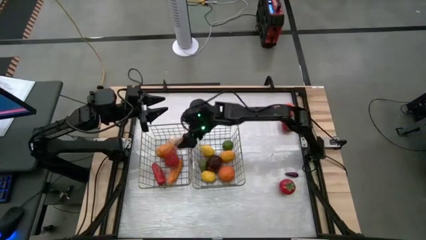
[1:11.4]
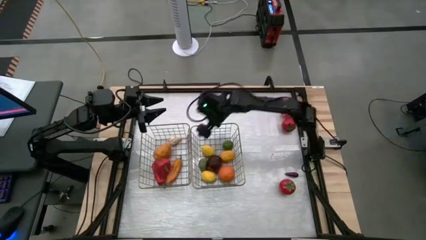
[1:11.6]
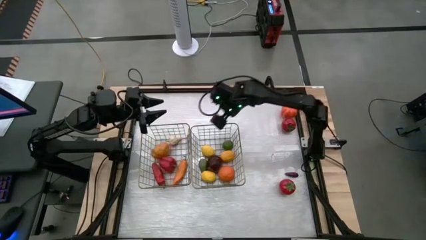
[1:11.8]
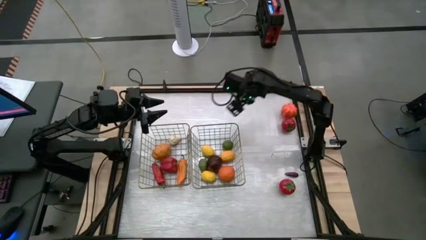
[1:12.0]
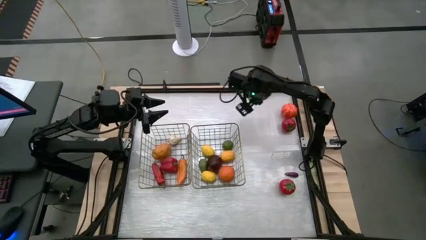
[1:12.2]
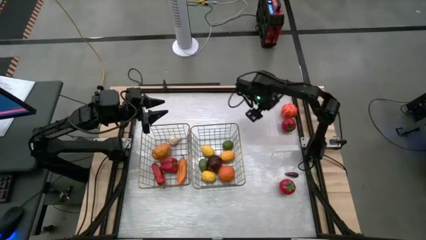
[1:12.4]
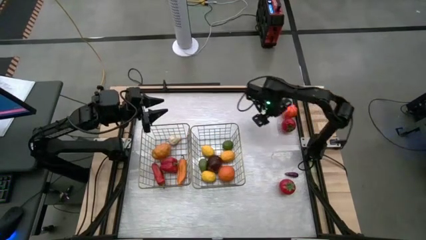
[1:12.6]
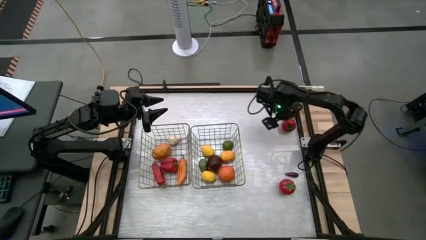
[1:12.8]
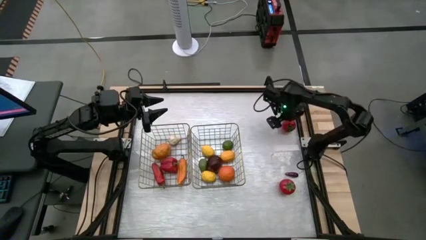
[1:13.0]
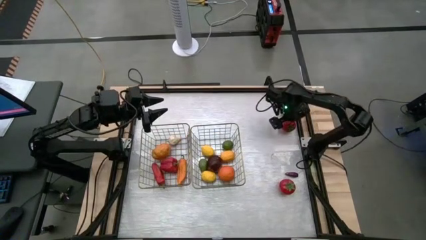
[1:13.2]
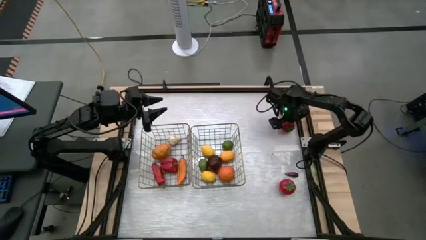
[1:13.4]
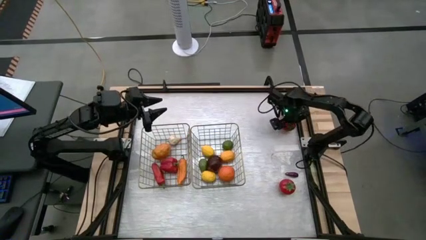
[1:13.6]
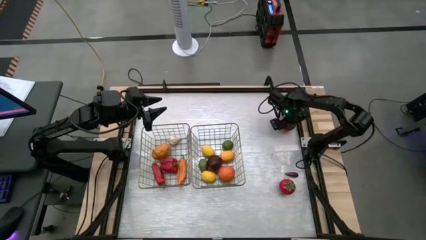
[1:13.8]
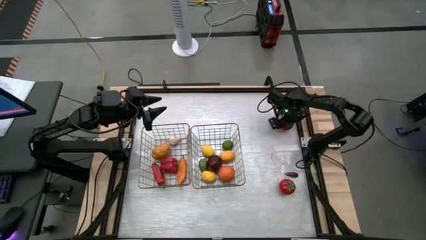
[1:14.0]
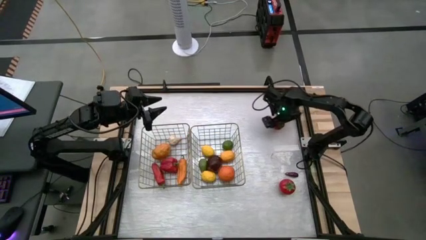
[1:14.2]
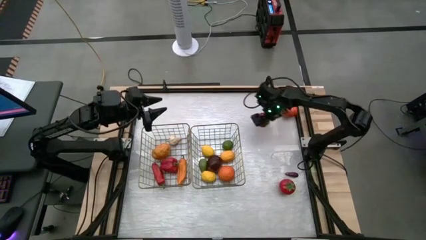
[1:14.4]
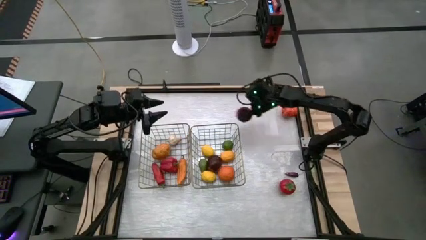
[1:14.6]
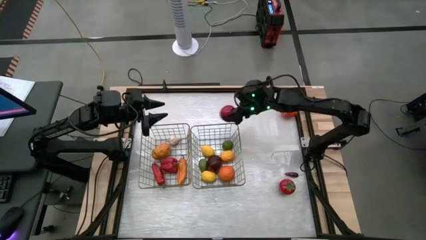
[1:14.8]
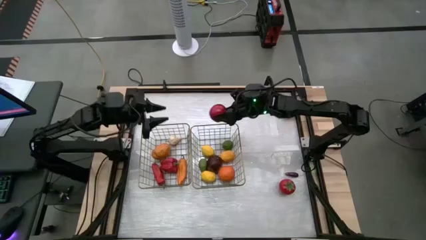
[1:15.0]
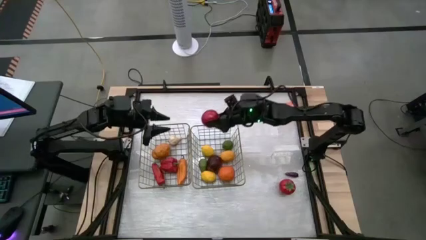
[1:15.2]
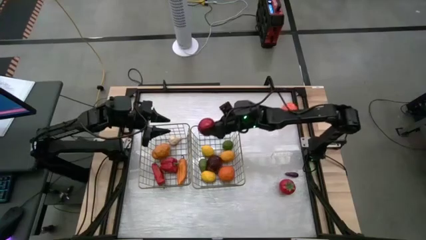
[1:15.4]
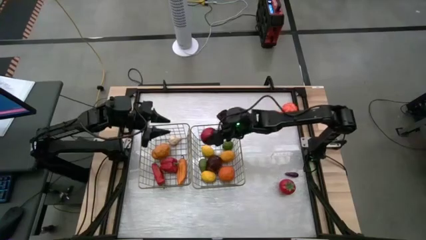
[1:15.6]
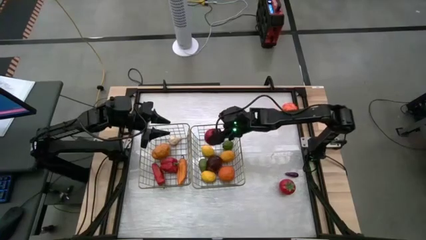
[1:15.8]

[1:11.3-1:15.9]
Task: Sort produce into baskets
Put the top red tomato into the right basket

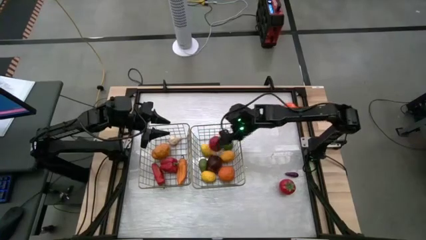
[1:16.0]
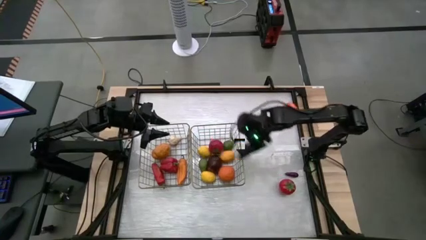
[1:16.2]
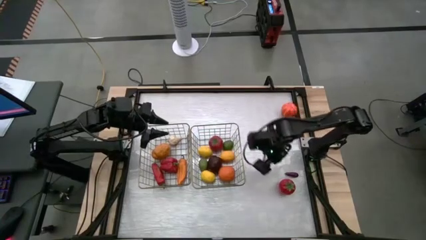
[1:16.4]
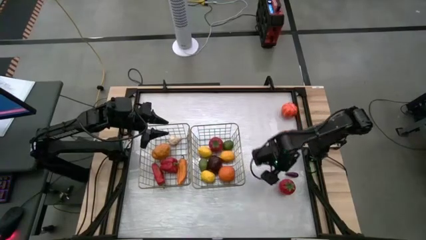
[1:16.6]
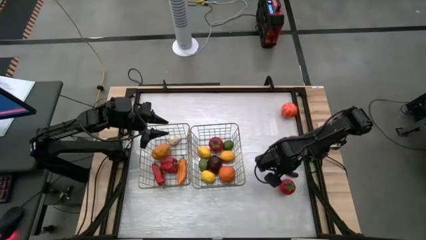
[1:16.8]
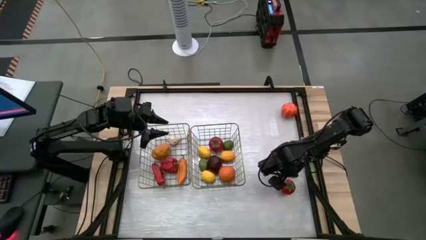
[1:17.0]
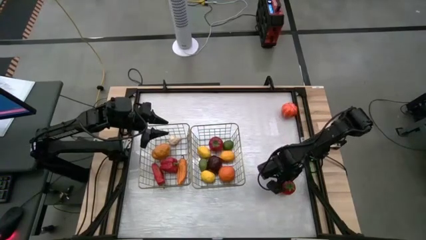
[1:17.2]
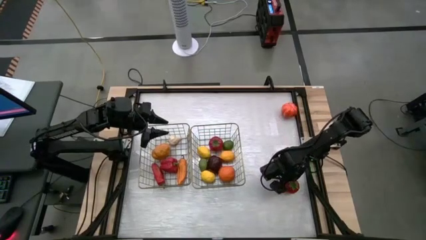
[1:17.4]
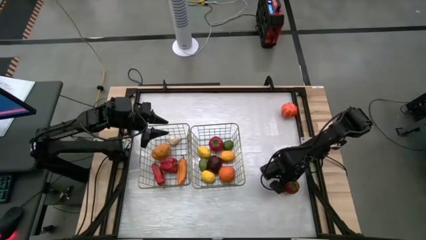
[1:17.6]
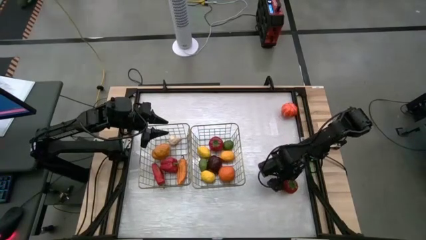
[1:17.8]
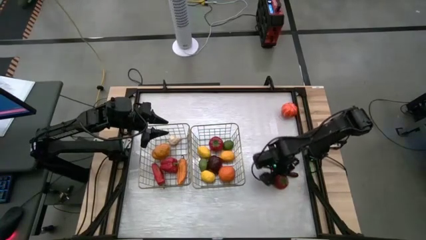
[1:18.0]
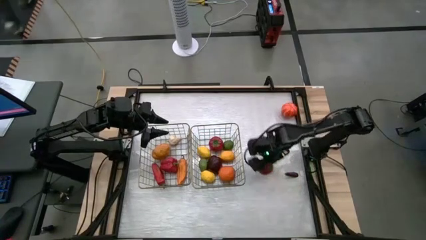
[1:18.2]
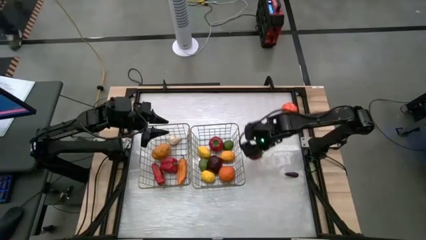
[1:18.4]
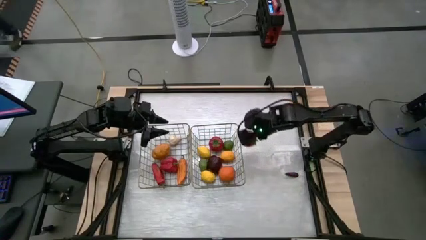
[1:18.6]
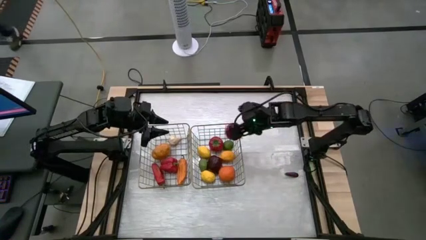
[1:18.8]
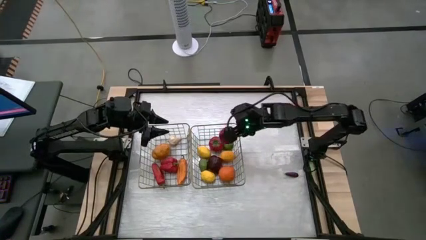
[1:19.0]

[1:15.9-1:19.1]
Put the red tomato into the right basket

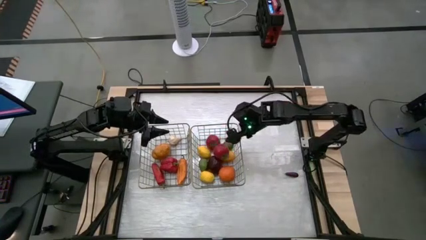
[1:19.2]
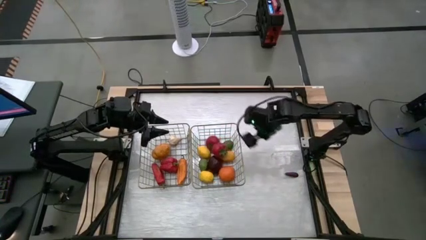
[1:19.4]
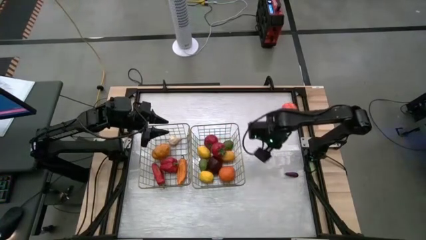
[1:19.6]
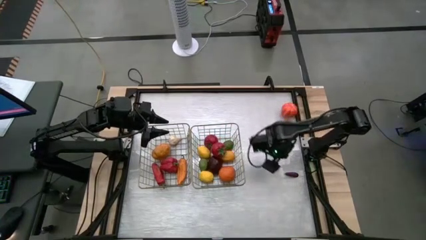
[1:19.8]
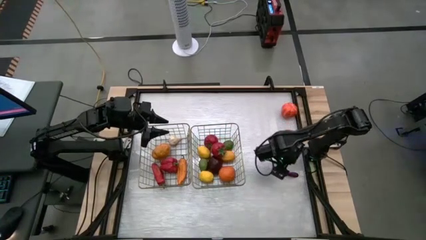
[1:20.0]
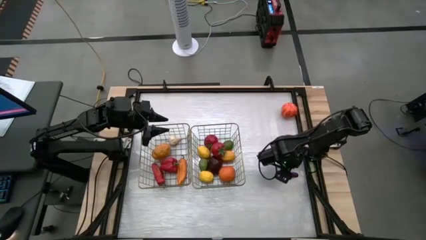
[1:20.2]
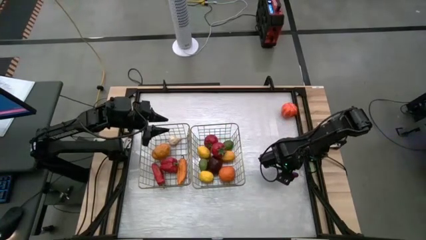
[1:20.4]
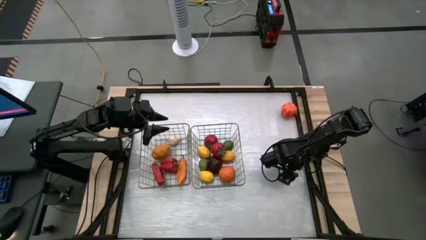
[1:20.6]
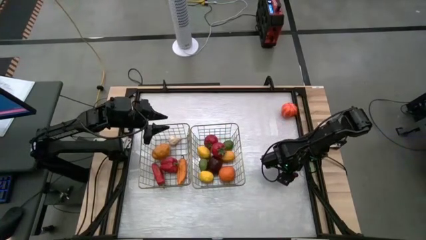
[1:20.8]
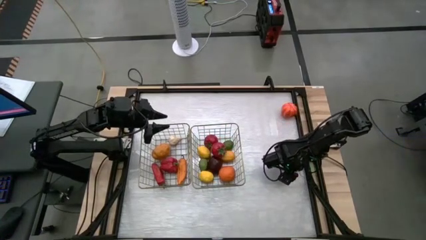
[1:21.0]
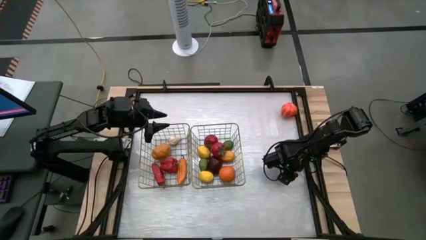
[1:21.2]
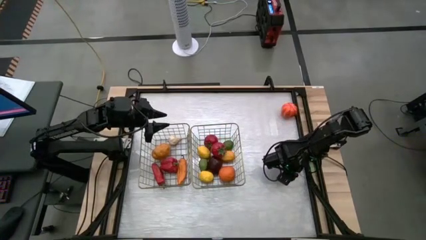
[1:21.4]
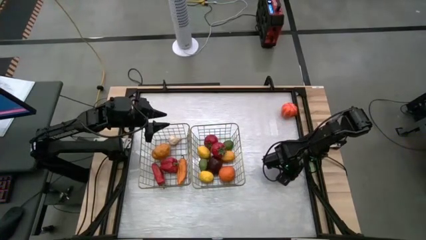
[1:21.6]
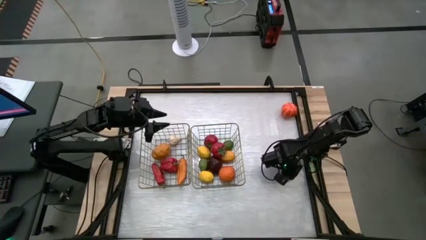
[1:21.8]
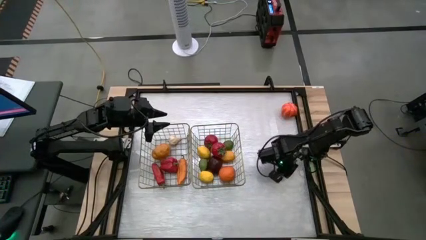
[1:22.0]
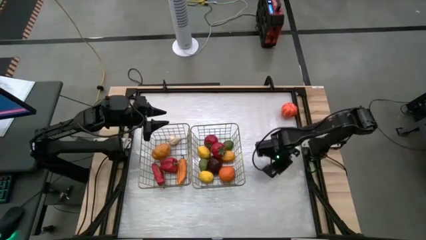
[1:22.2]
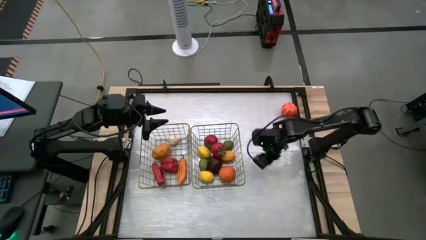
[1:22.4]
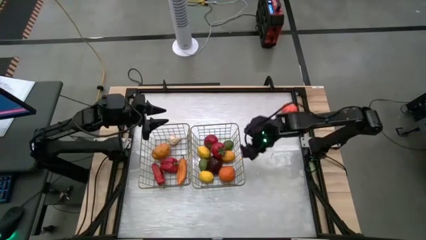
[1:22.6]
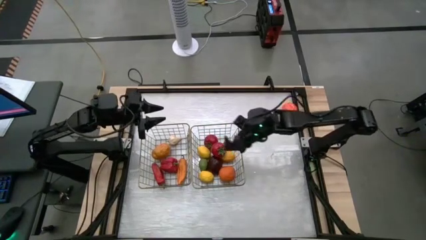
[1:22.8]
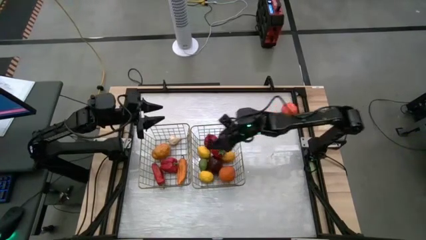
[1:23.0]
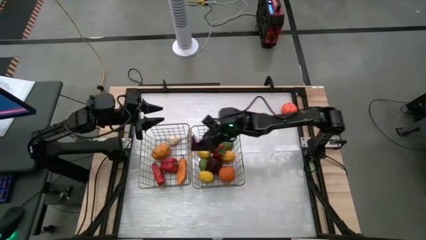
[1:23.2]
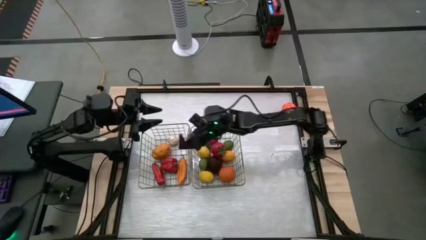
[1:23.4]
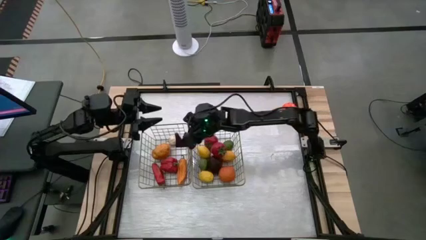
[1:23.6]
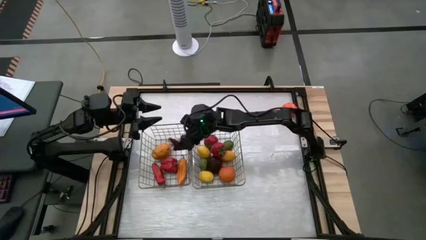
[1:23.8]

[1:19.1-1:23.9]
Put the eggplant into the left basket

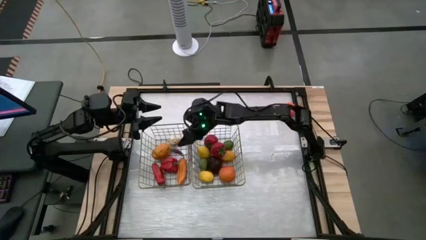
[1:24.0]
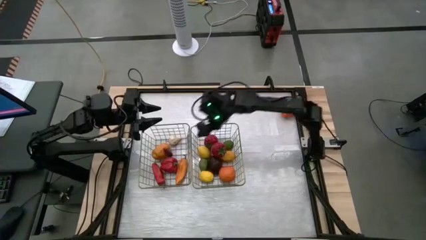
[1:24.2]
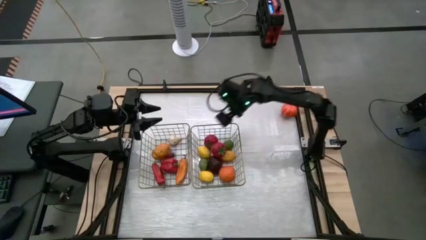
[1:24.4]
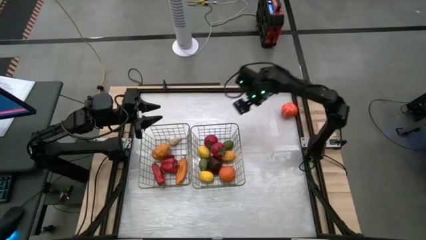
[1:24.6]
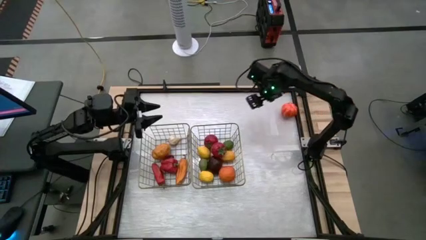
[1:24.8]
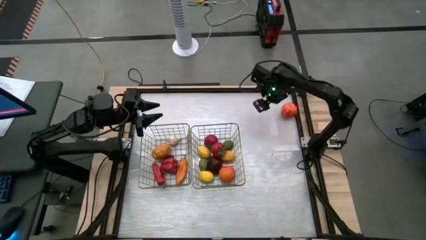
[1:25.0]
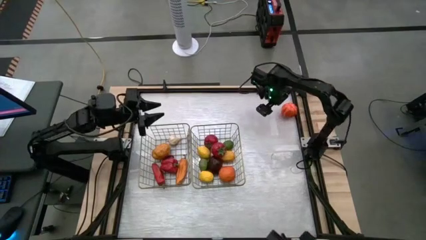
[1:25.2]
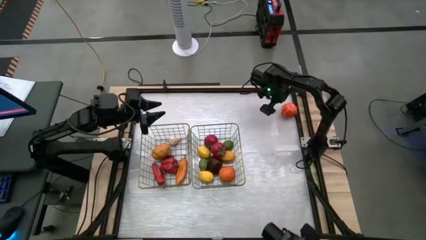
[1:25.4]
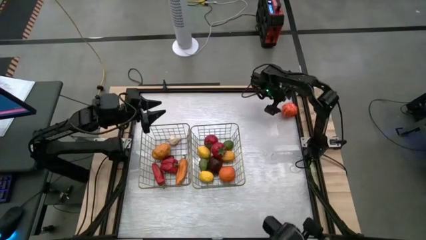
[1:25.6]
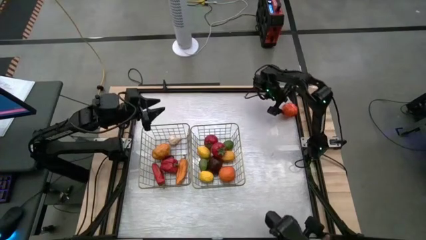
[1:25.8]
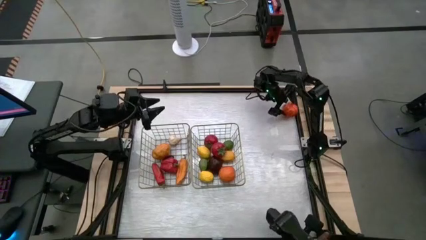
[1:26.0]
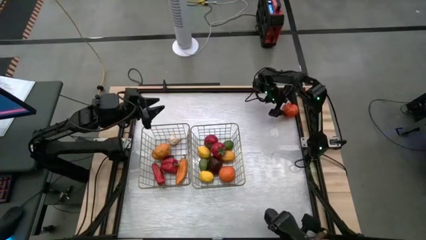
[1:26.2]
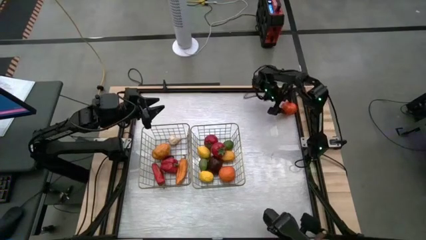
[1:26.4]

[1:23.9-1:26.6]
Put the orange pumpkin into the left basket

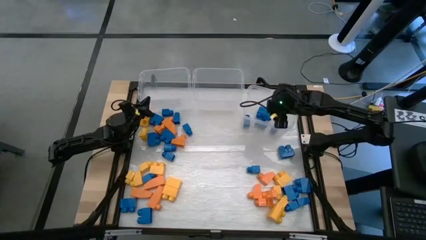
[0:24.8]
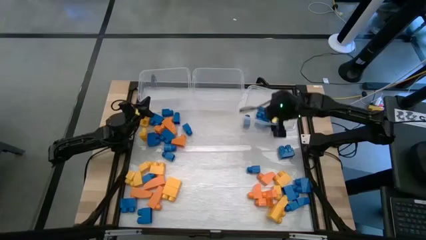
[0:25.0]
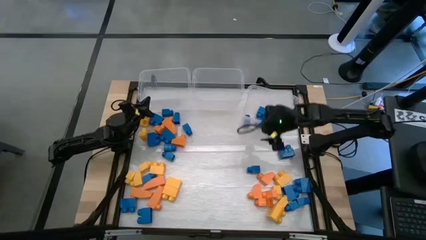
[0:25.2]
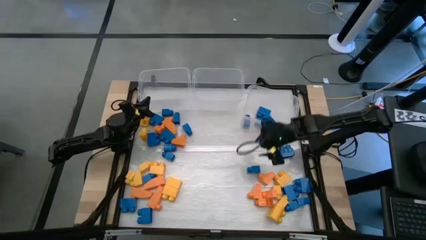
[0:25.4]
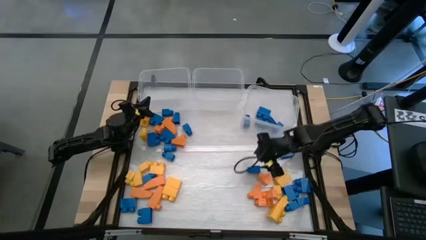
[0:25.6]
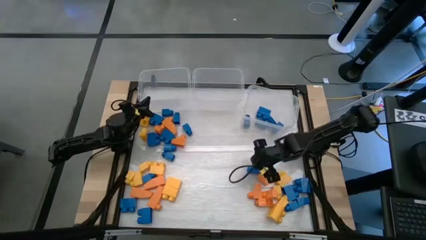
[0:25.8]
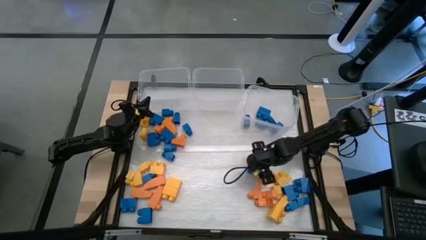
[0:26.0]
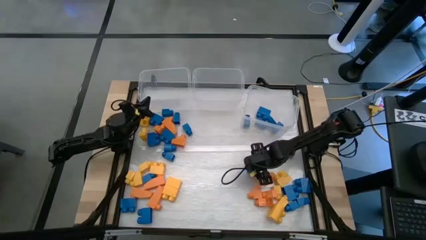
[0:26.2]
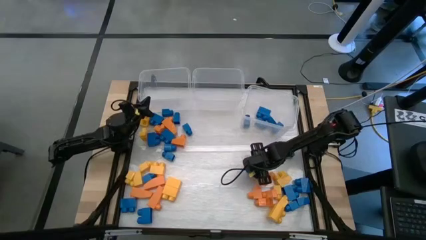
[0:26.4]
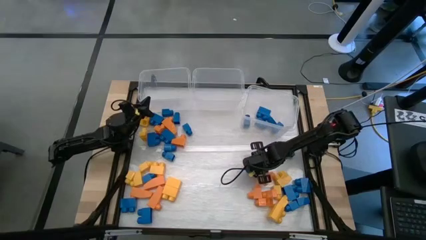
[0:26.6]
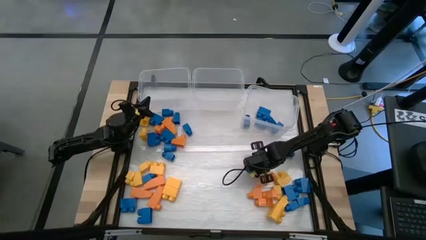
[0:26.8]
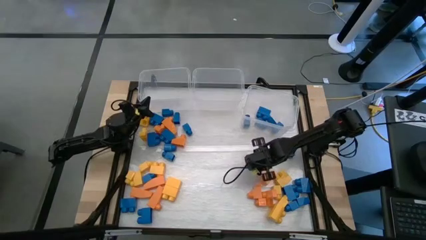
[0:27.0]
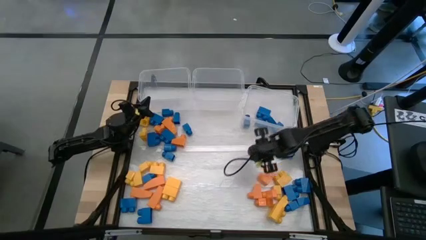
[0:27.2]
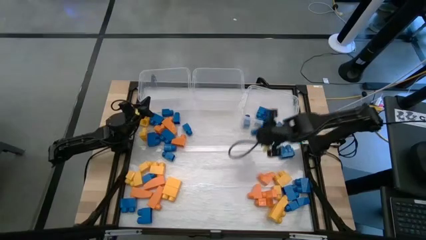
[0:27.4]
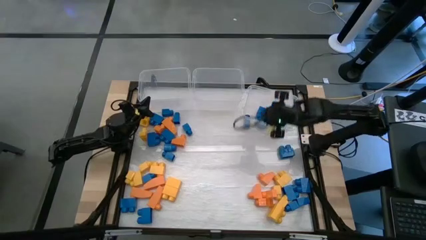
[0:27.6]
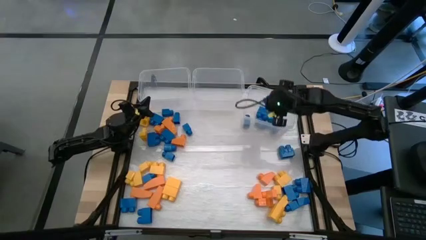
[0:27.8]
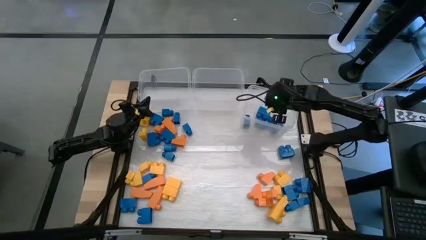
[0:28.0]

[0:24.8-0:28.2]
Task: Sort blocks
Put the blue game piece into the right transparent bin
